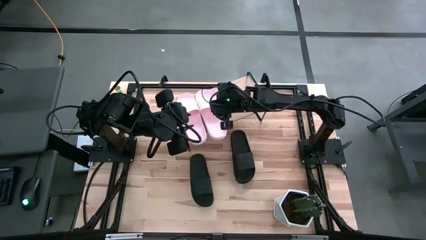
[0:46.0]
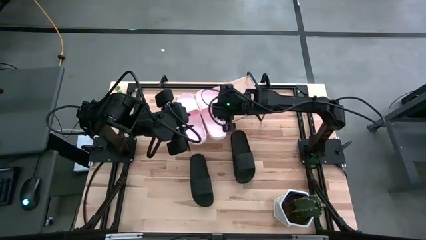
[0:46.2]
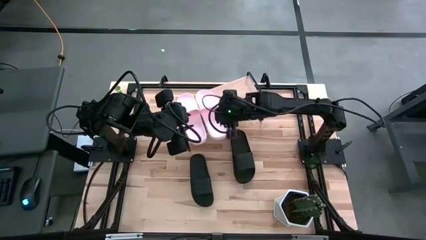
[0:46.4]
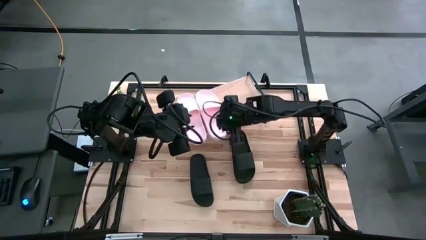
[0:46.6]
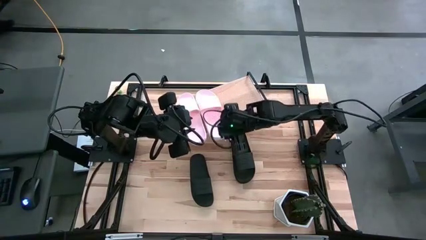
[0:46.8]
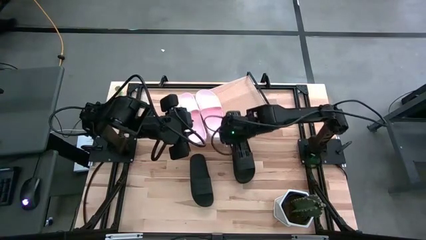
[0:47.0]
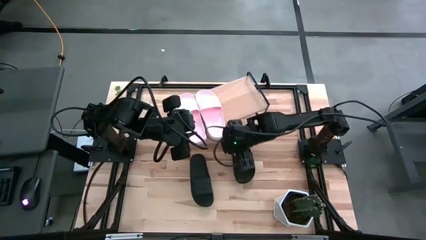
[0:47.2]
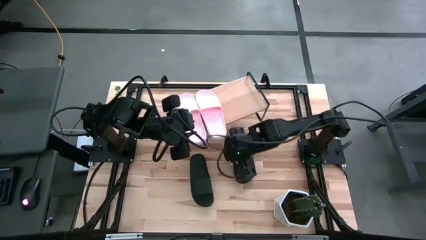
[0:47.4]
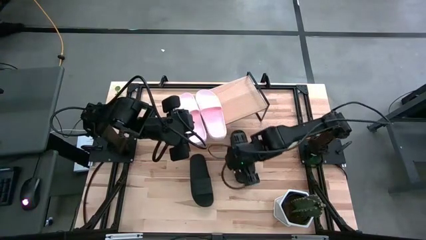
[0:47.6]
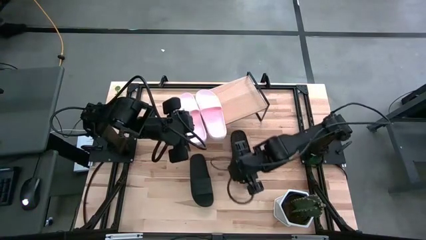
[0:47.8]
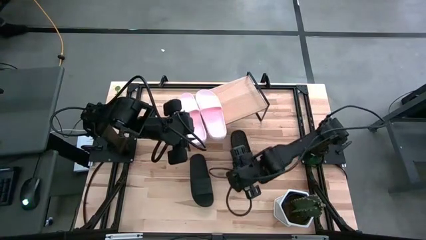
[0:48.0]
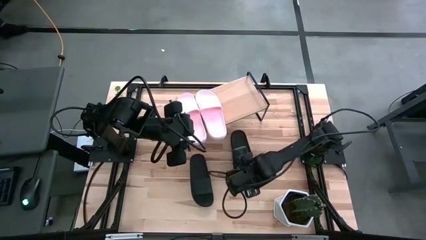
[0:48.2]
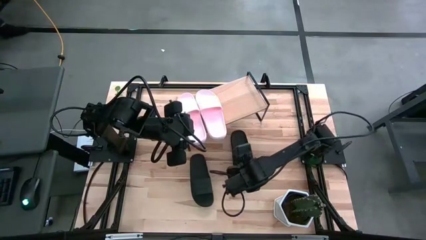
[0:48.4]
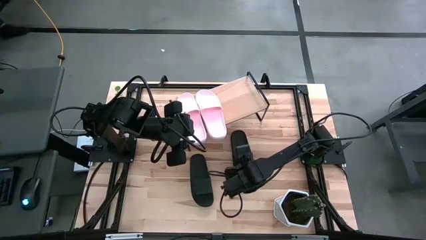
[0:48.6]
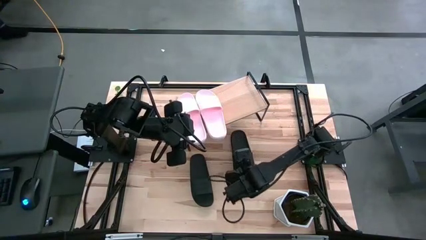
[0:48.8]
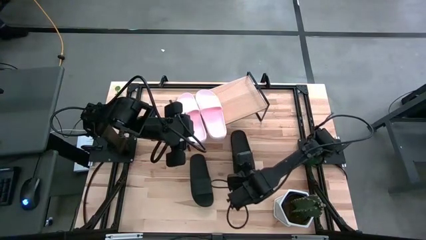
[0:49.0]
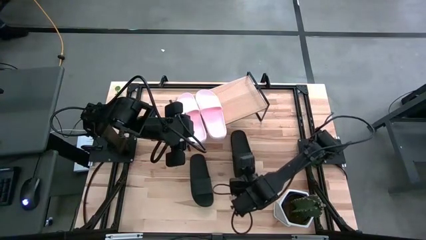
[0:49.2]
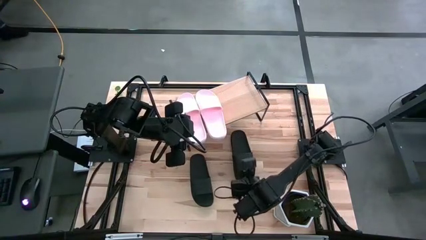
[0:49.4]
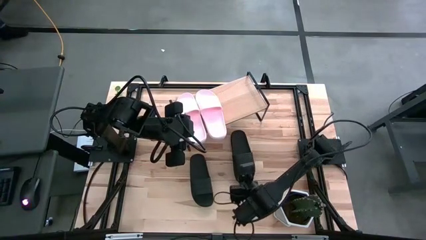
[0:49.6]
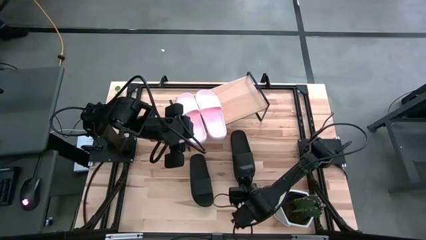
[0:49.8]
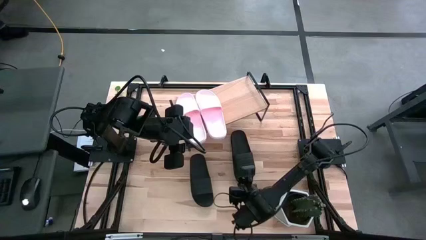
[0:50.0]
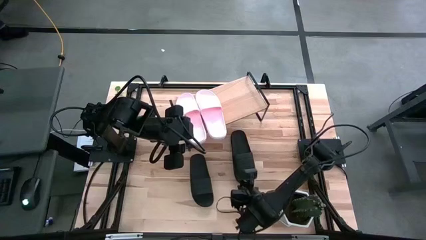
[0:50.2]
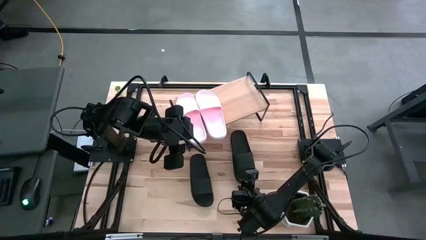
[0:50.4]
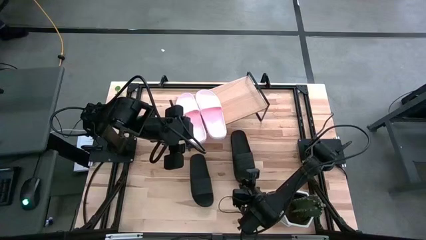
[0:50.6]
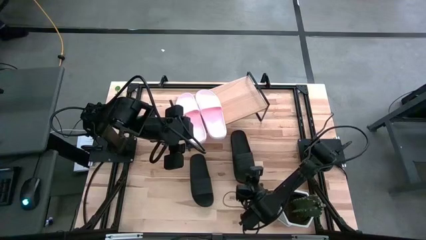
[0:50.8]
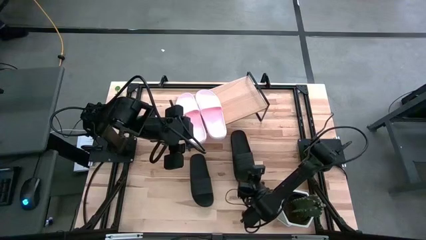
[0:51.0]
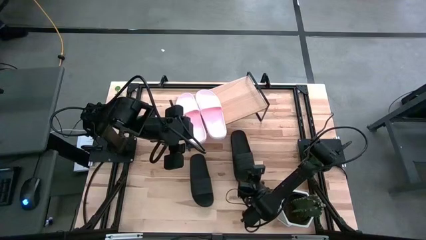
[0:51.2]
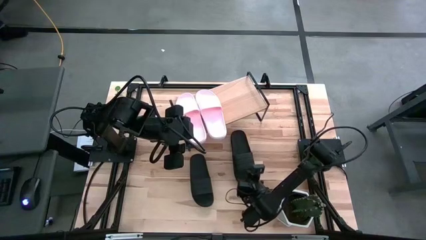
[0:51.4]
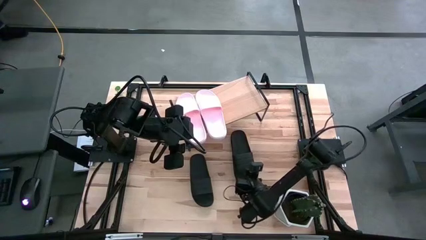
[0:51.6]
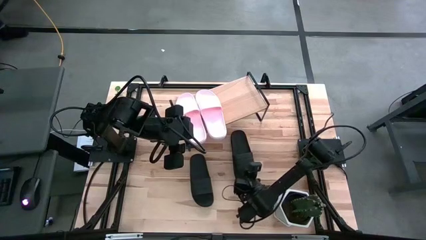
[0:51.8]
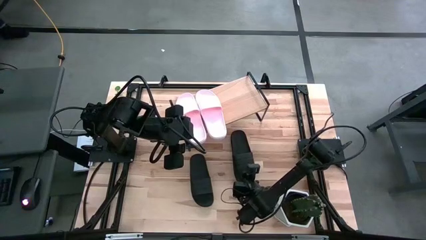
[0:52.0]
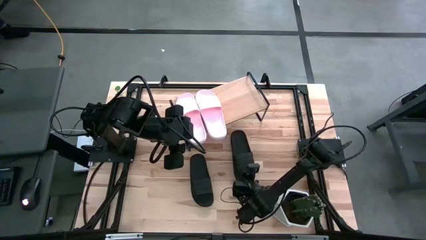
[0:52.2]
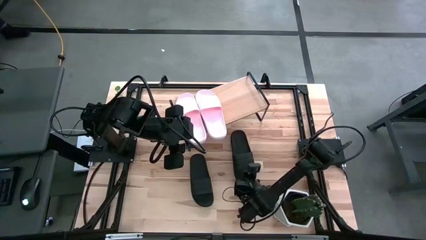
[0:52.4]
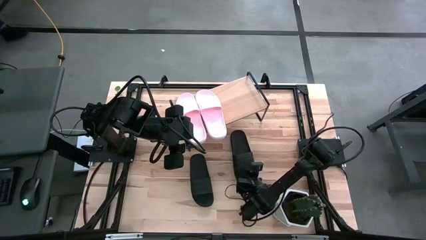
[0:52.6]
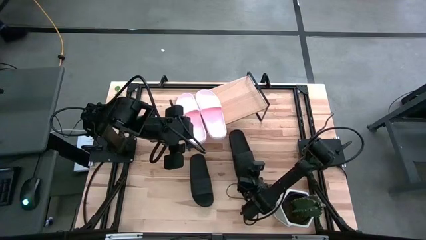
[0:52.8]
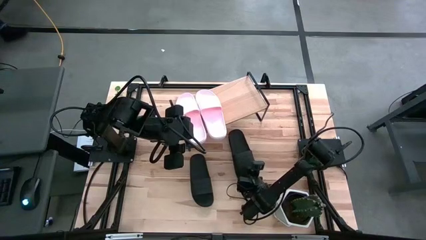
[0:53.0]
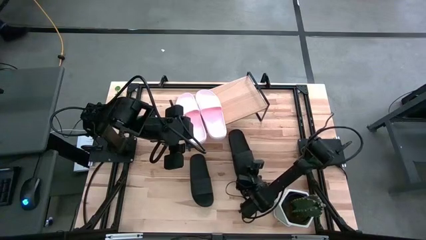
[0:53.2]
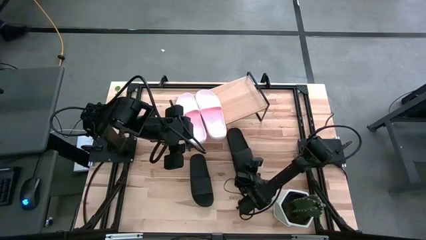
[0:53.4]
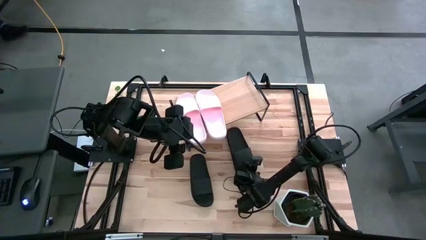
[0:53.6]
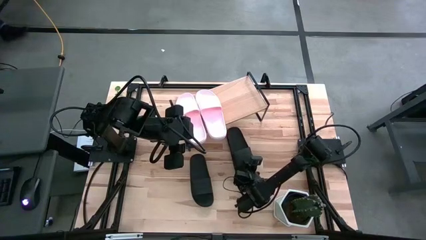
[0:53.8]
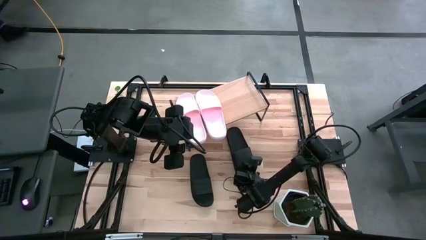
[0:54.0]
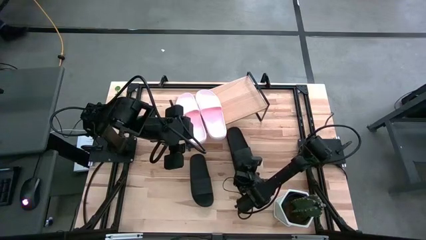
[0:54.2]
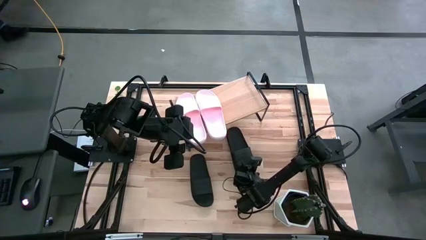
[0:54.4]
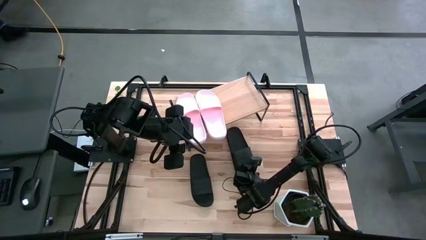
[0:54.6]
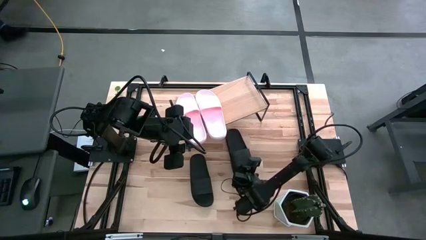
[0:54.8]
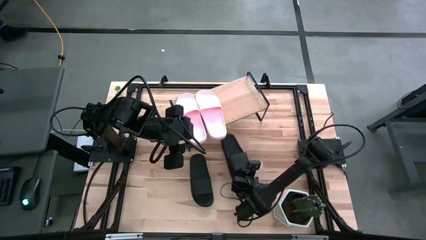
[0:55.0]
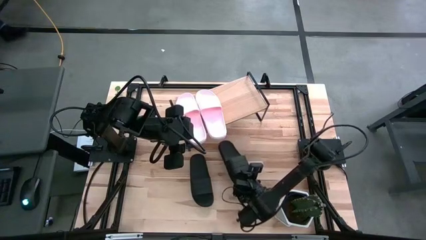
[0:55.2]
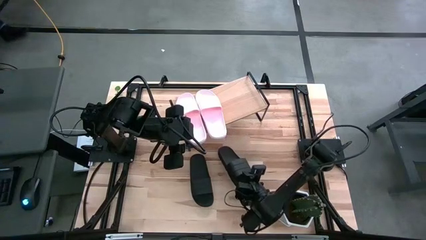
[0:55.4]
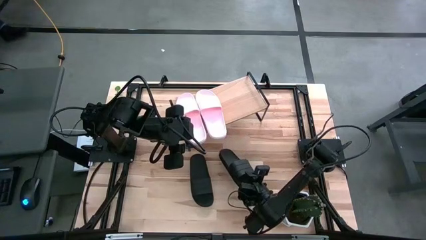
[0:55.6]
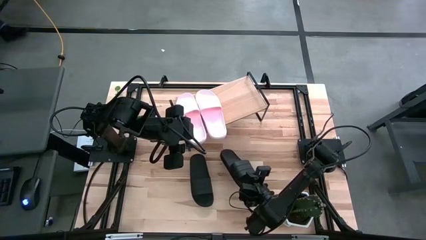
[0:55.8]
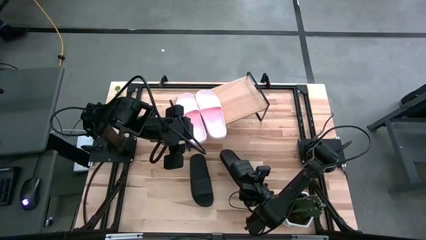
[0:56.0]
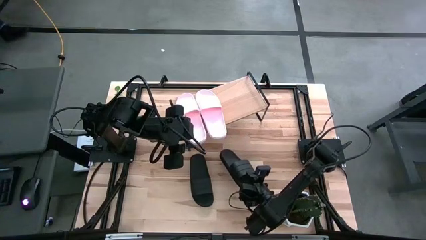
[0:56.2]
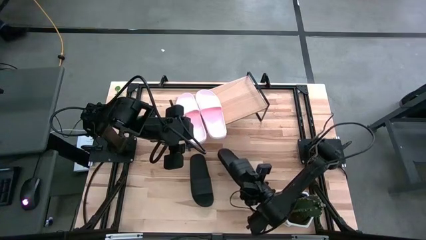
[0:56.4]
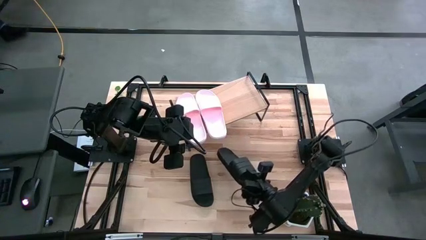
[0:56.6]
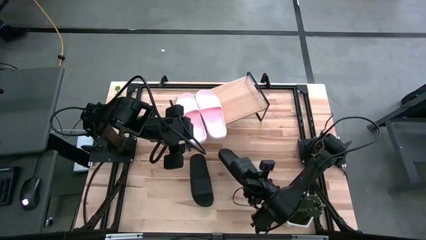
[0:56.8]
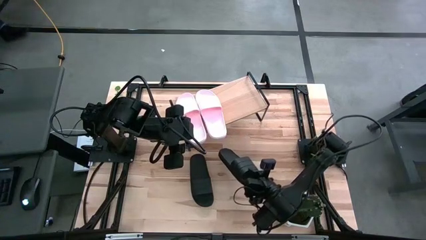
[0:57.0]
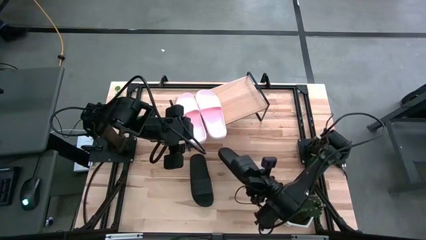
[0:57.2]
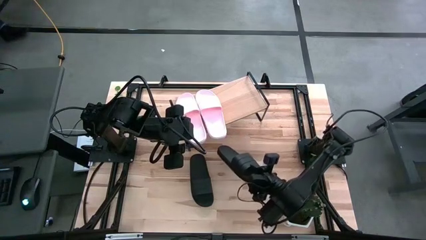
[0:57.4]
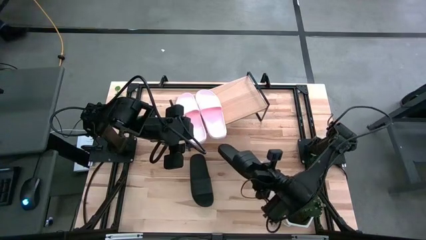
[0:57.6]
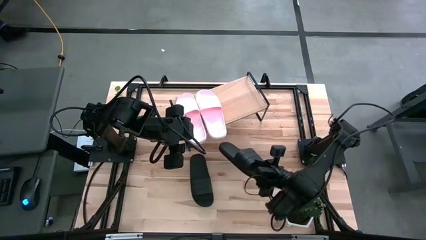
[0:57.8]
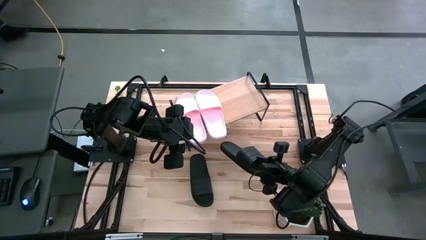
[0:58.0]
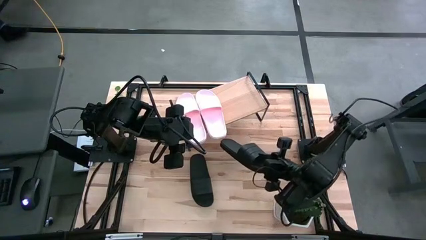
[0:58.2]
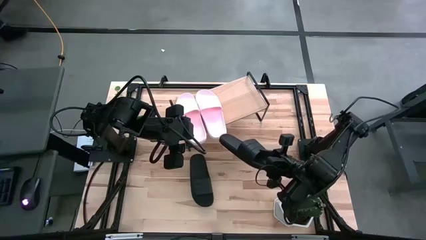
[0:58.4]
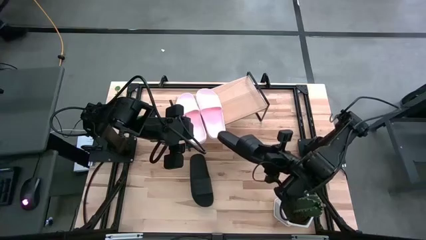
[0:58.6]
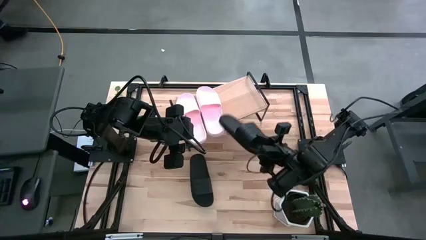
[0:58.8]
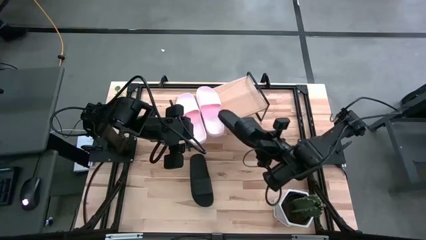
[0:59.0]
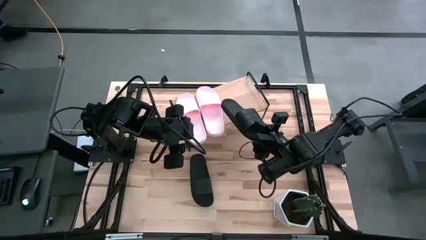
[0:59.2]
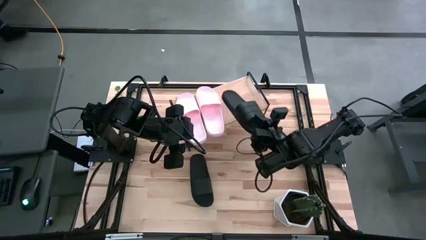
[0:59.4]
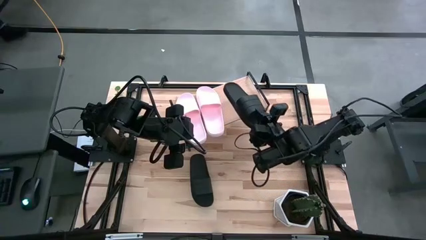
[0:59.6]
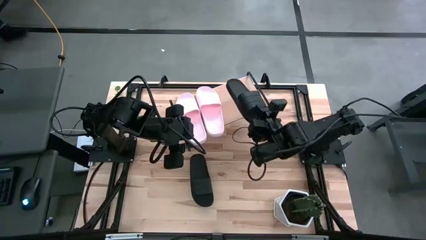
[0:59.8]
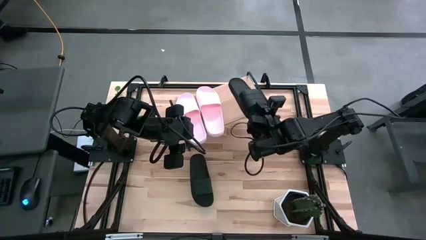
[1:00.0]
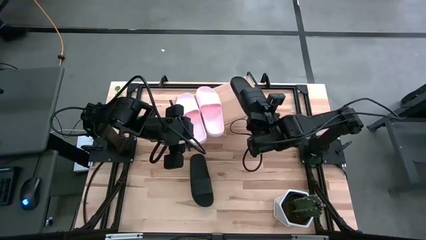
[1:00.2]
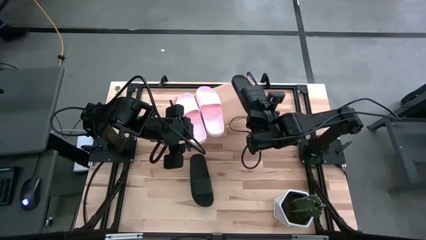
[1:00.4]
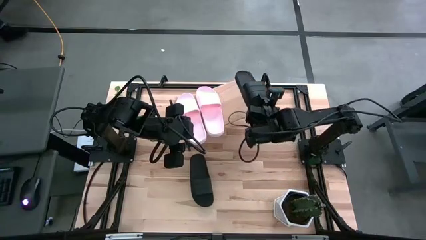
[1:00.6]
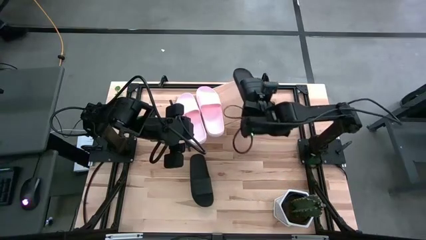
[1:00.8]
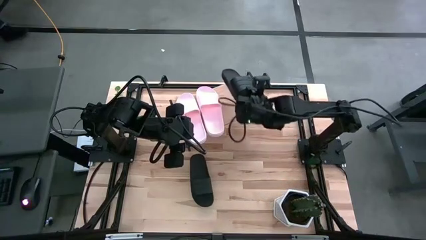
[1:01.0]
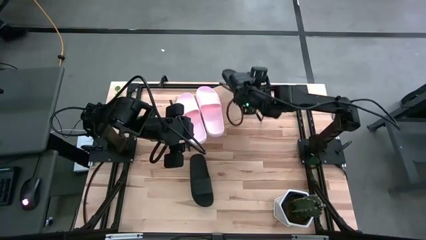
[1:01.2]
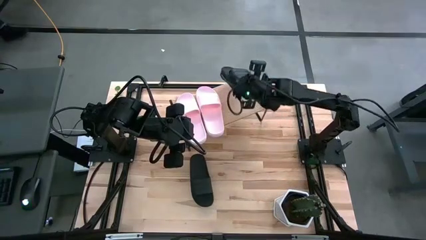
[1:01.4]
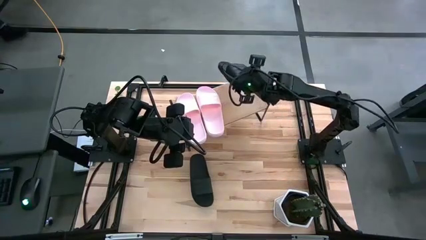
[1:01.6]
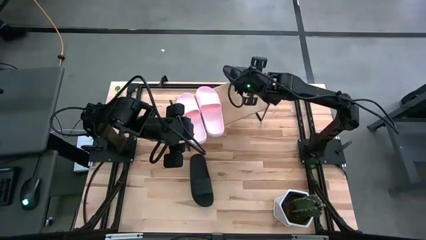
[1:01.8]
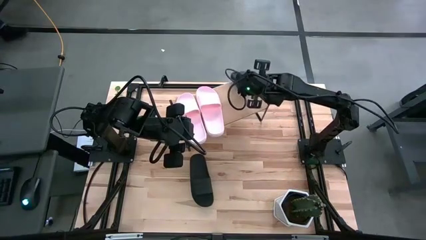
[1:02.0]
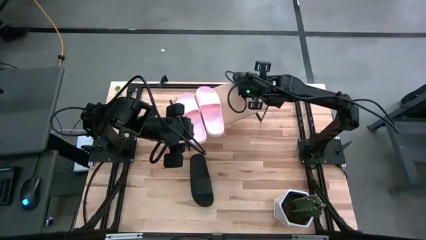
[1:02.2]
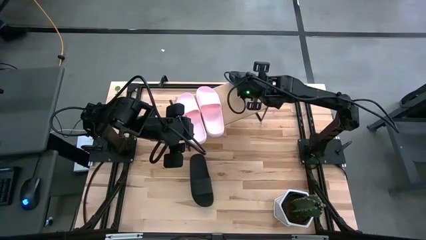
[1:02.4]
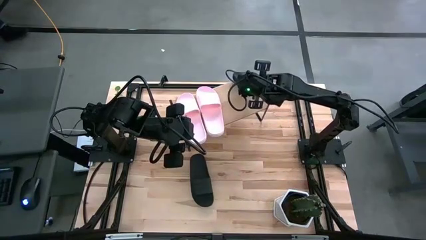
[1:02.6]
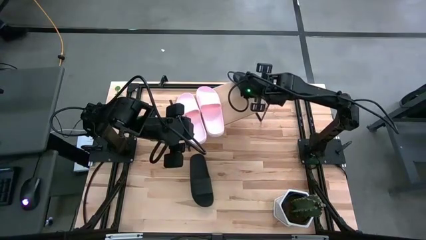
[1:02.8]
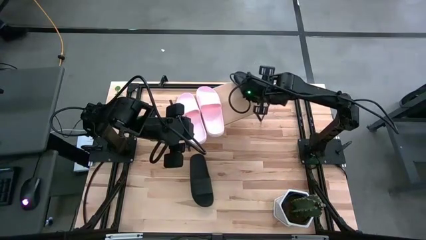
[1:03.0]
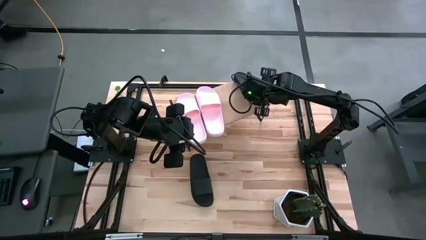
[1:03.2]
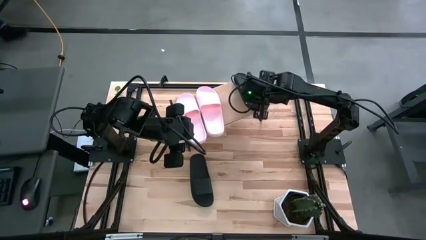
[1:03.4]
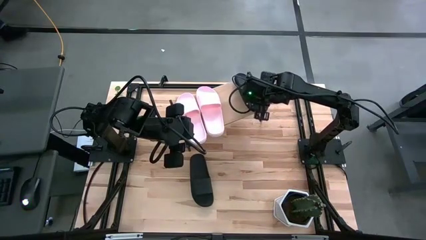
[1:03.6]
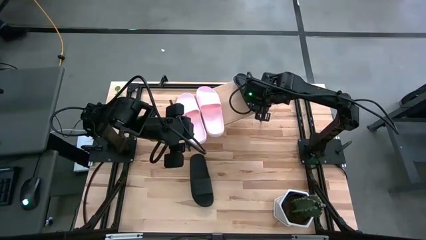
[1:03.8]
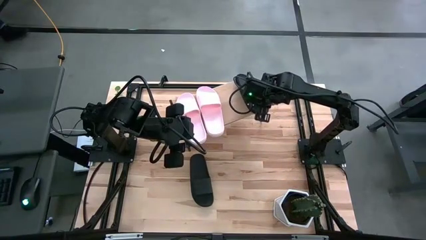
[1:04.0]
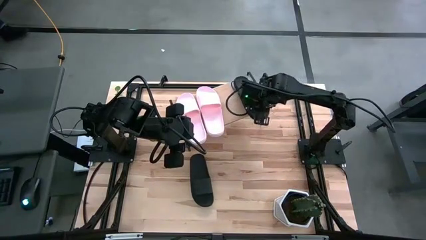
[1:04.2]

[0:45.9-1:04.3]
Task: Pick and place slides into the shelf
Put the right black slide on the shelf
